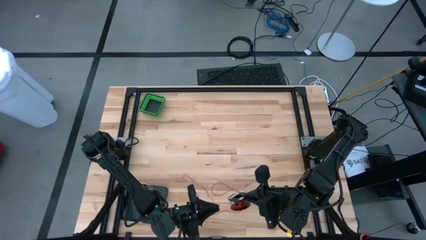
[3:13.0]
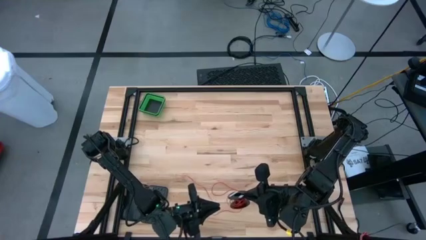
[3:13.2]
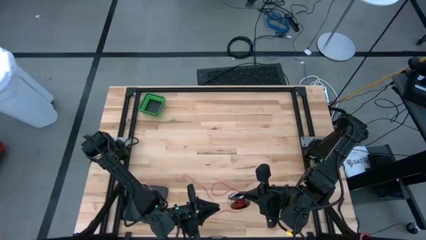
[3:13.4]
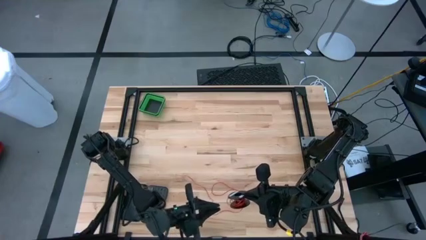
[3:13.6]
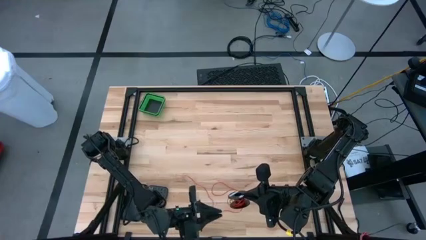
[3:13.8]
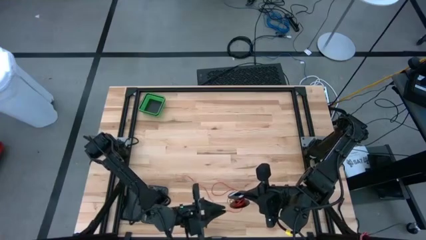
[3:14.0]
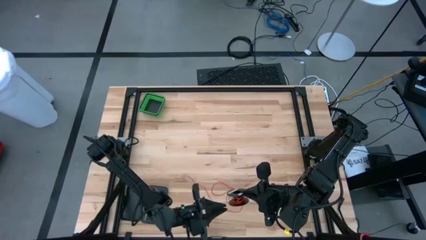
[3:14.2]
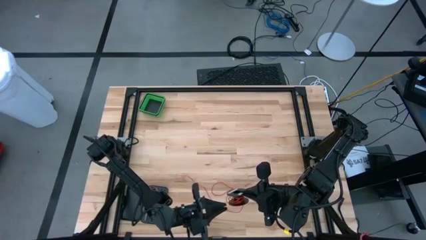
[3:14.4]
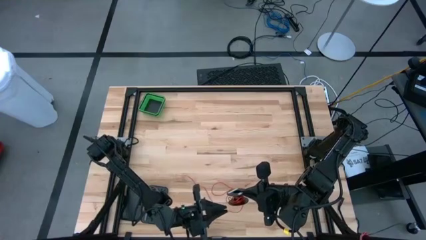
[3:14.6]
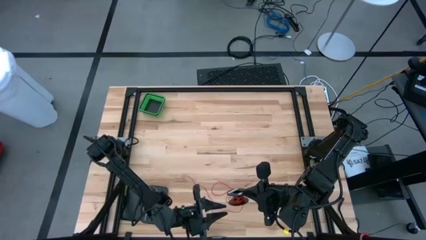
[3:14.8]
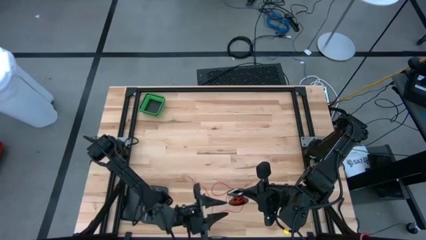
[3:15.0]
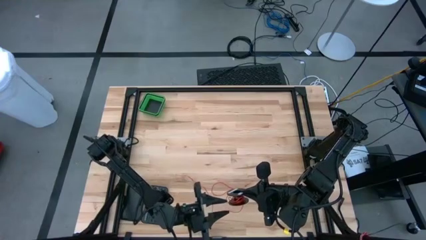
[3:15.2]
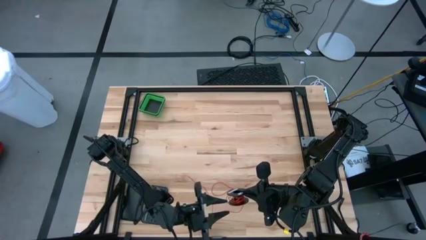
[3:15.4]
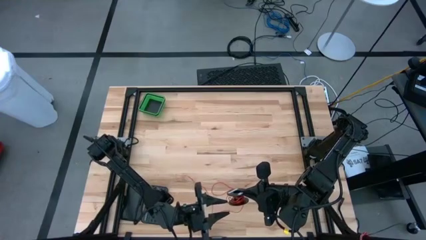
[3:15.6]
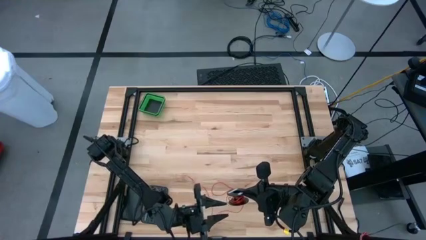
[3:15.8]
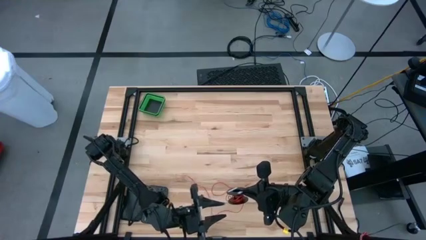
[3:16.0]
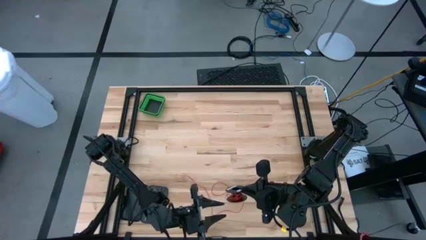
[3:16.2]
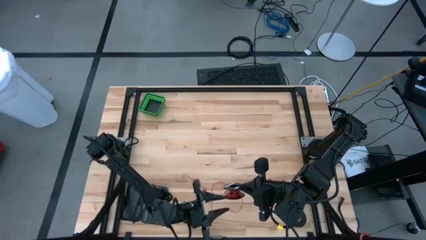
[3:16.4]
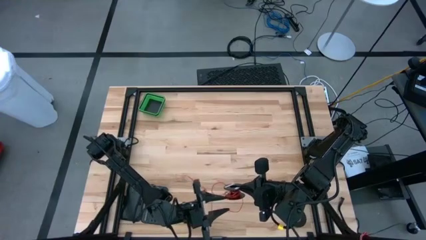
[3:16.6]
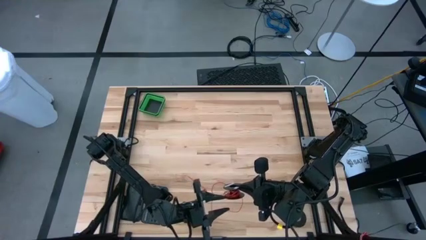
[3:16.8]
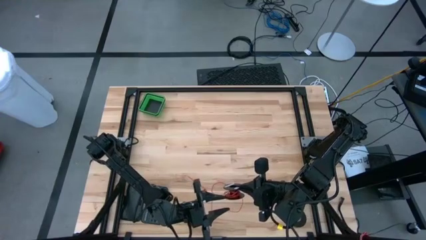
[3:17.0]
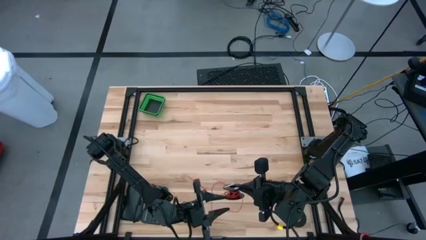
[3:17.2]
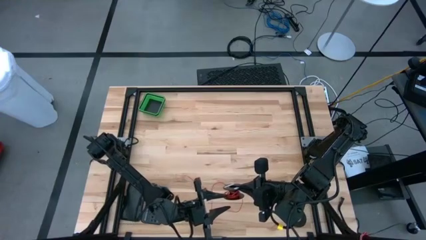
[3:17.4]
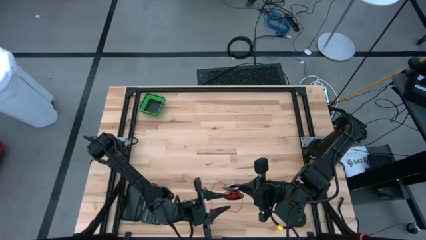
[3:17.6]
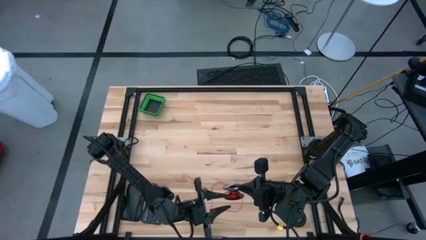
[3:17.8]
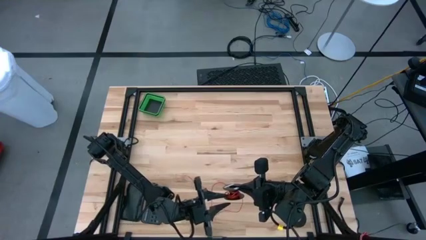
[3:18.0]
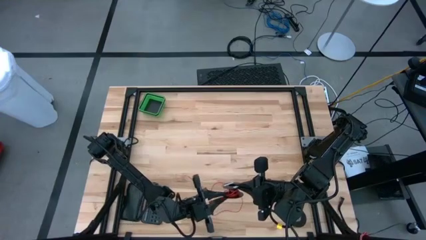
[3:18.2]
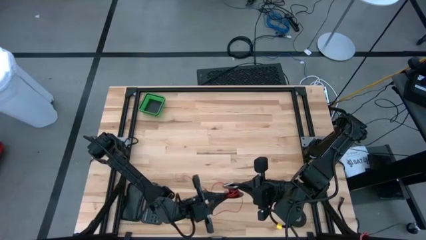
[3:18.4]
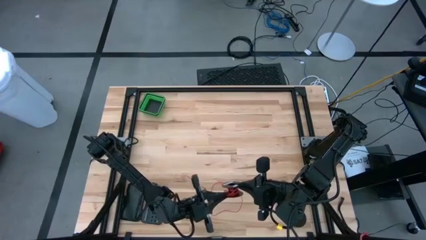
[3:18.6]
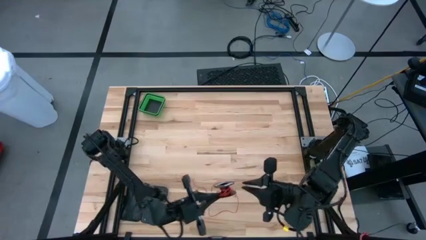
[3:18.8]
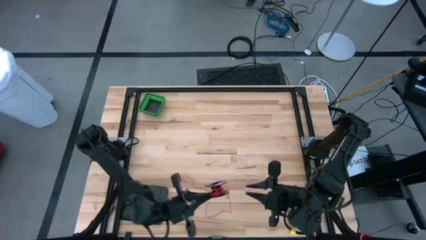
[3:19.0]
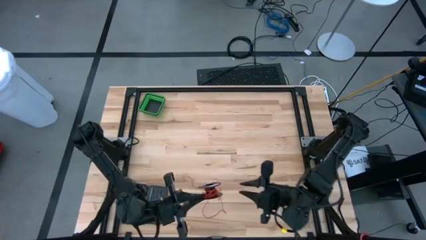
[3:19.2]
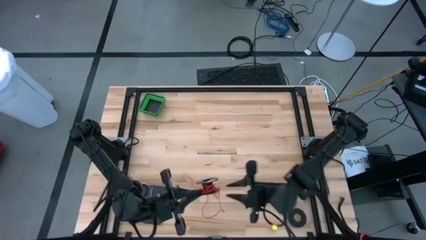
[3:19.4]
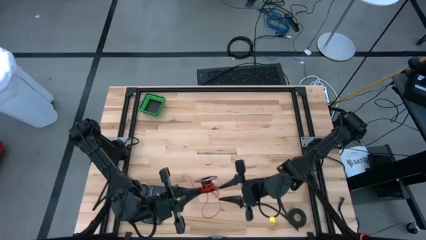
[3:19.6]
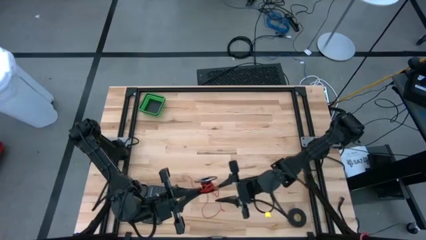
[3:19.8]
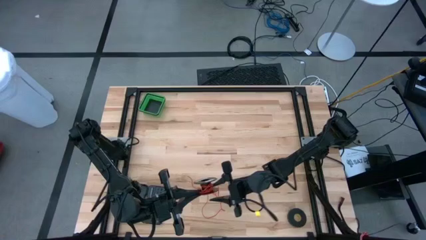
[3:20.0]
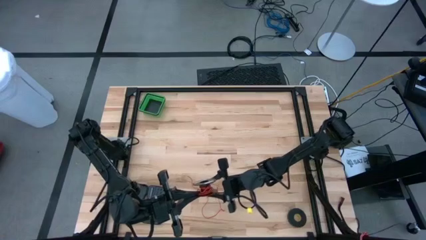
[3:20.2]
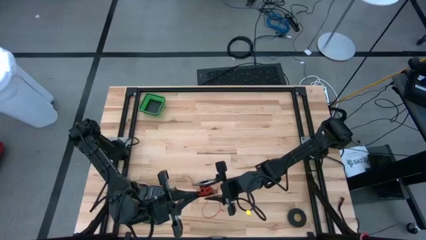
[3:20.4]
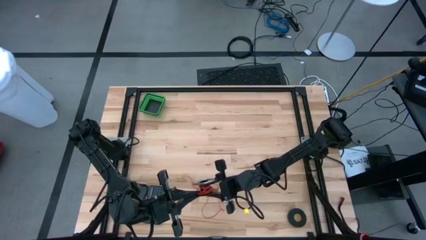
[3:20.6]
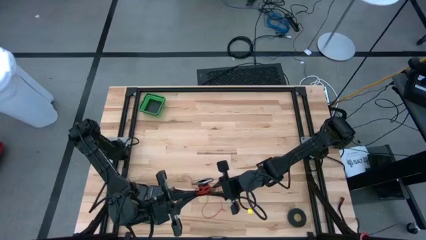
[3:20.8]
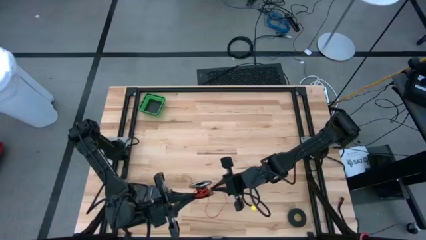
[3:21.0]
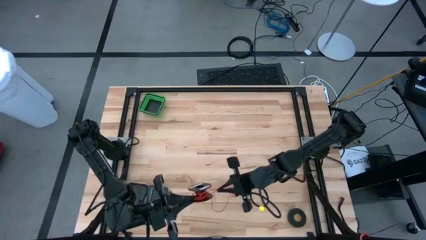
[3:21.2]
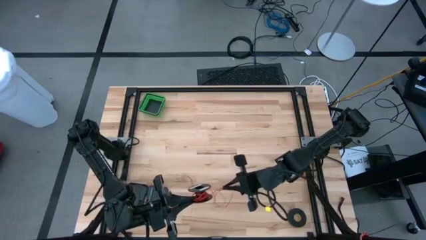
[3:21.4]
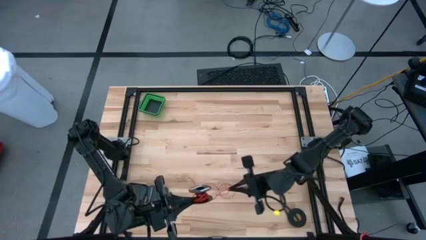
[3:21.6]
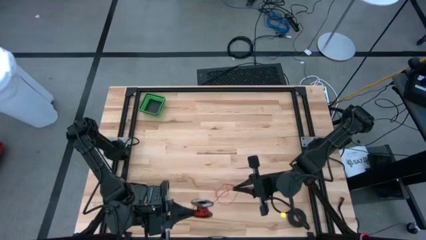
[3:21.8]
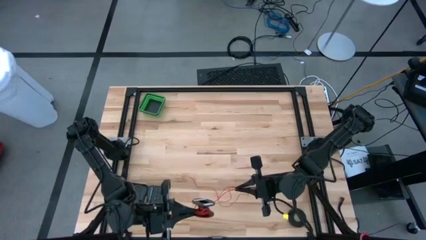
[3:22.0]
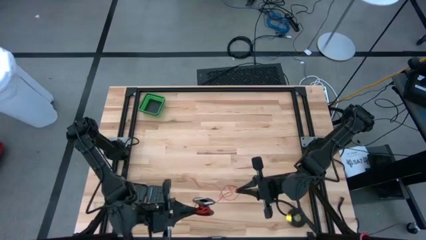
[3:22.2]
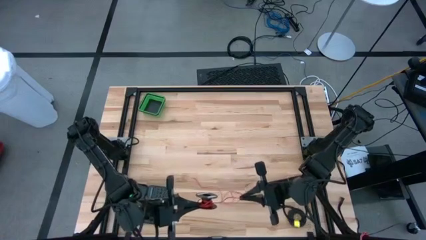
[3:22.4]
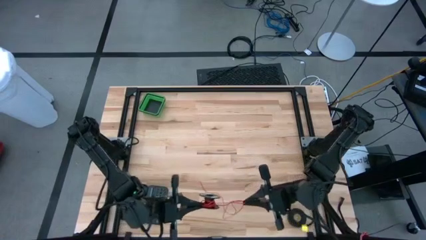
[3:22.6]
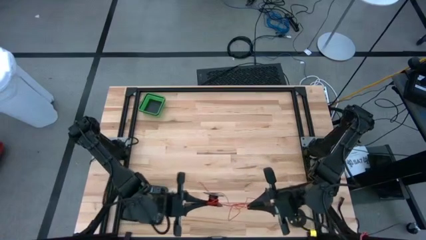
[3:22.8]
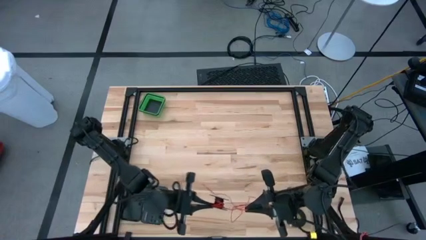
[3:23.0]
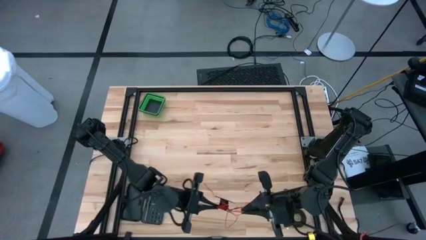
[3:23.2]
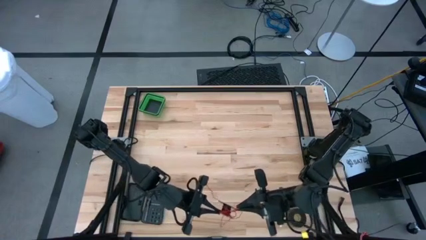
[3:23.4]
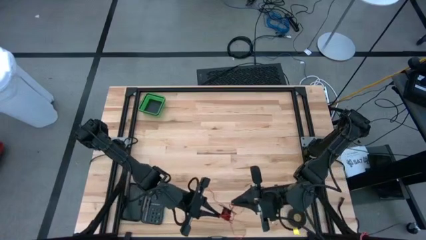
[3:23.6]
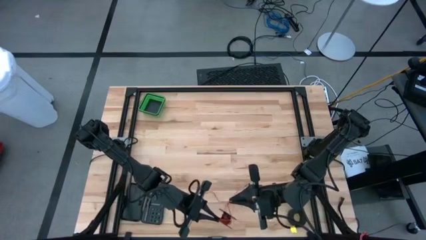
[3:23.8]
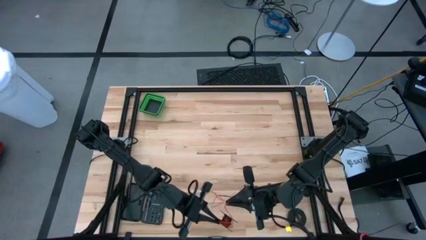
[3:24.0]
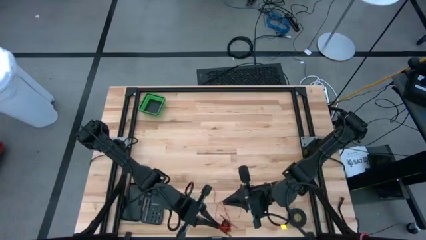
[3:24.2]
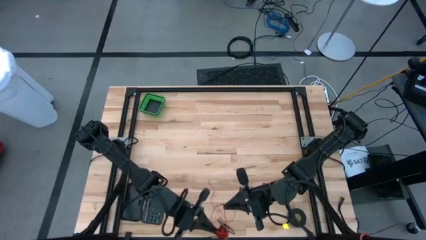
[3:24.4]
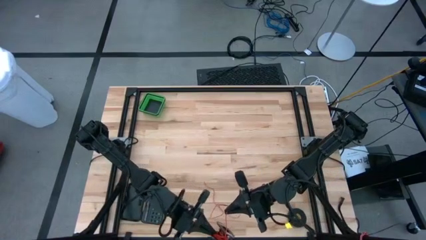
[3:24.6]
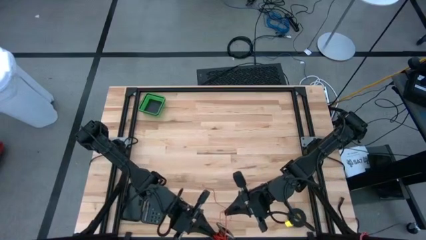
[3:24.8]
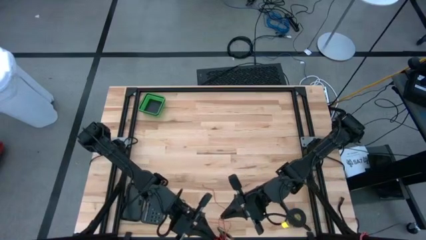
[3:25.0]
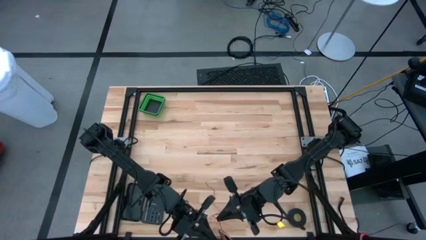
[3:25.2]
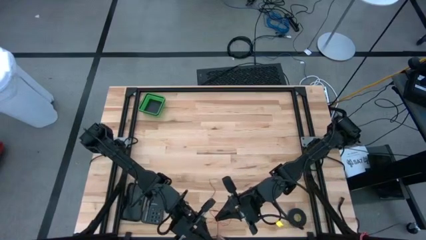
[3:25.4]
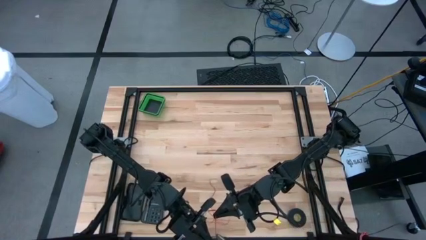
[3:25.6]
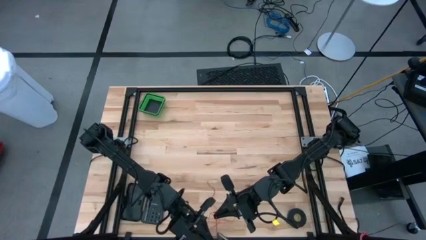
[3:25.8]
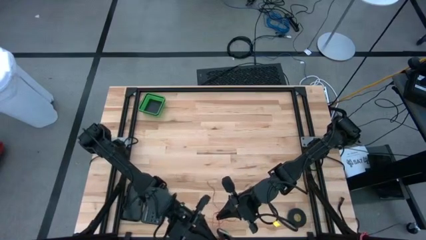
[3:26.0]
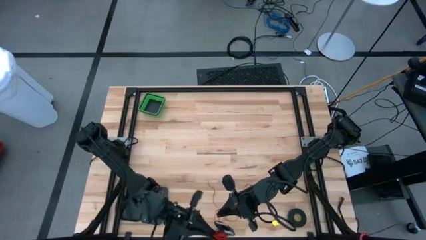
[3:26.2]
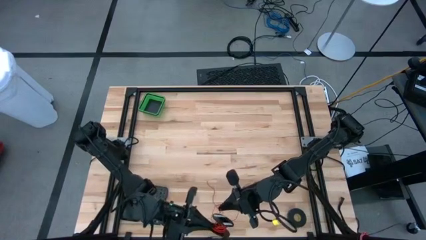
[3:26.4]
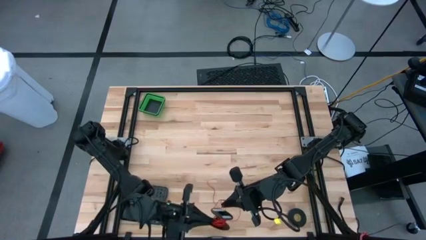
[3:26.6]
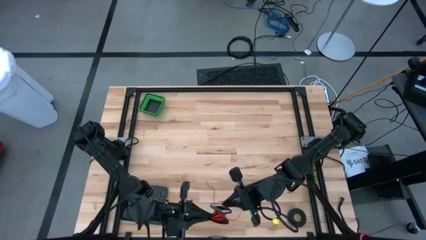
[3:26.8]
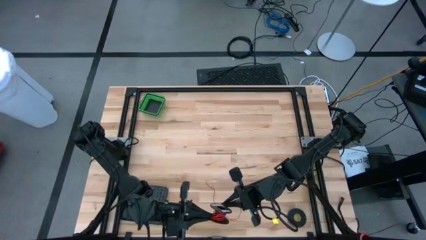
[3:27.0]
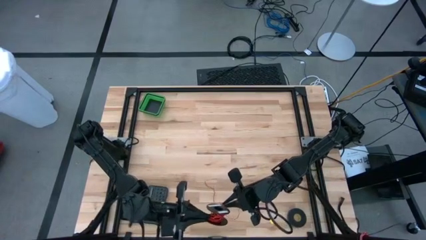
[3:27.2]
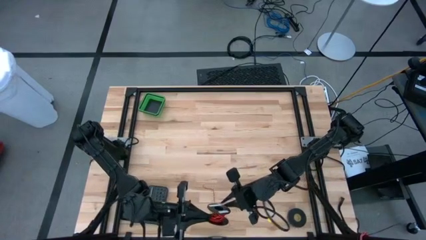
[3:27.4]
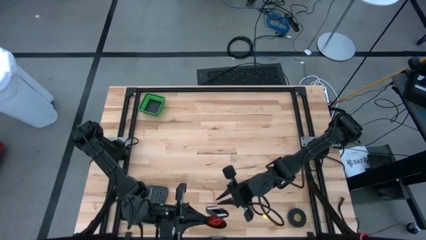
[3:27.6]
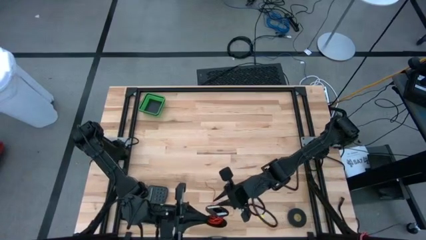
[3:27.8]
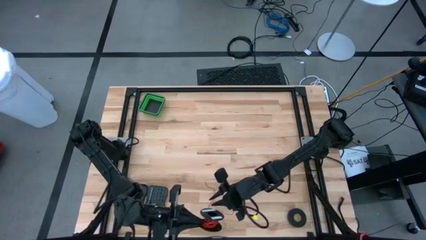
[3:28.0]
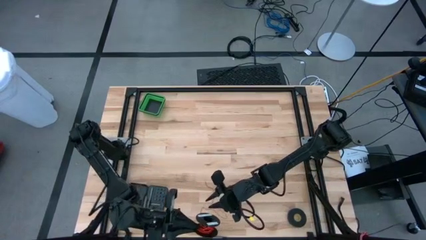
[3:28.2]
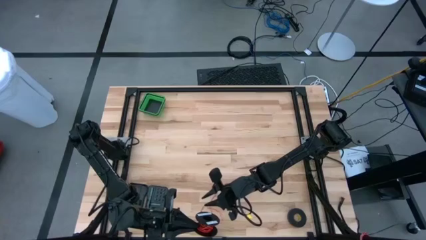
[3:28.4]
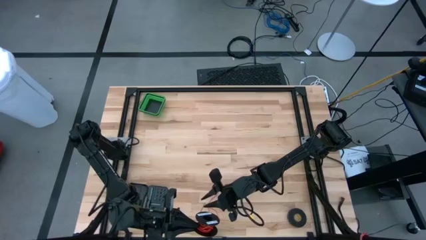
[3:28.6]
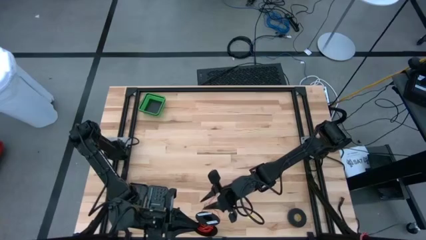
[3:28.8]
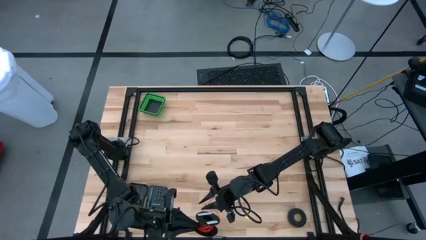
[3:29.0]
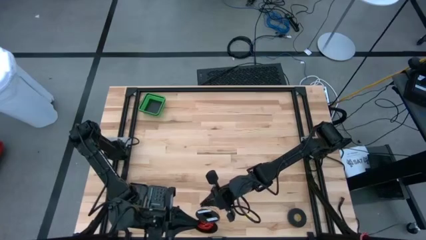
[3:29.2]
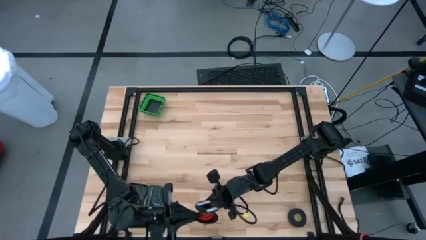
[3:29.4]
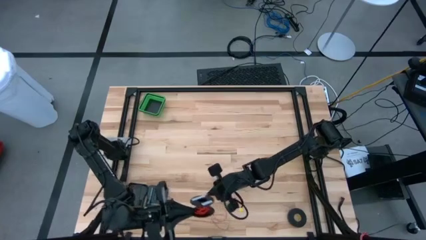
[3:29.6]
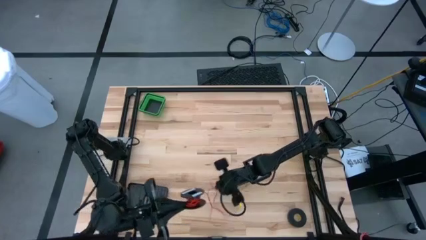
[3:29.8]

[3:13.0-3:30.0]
Task: Coil cords
Coil the red wire into the spool
